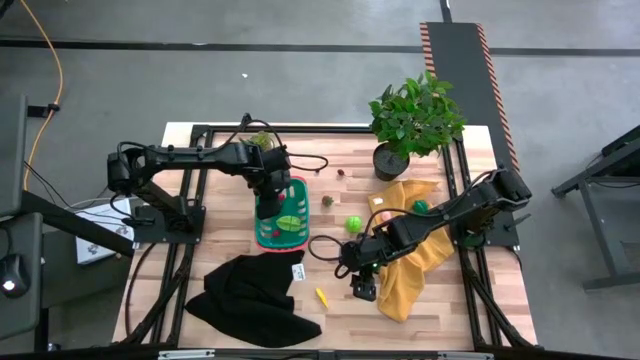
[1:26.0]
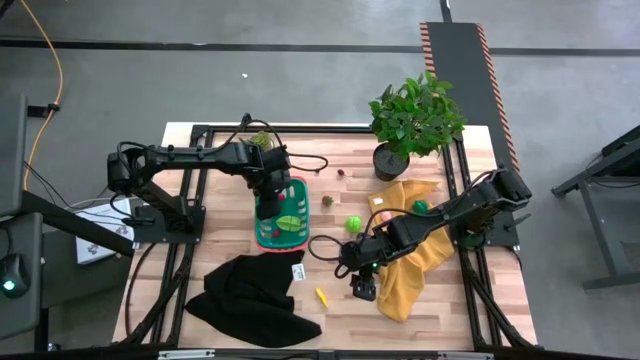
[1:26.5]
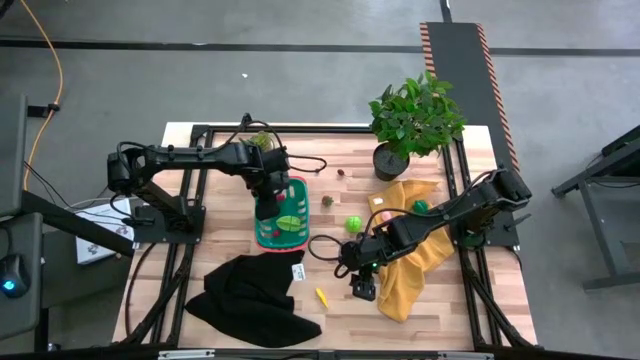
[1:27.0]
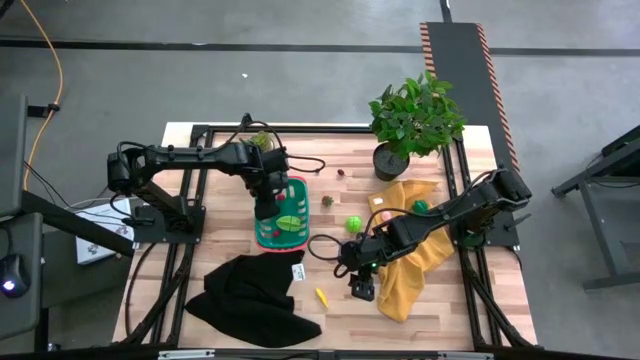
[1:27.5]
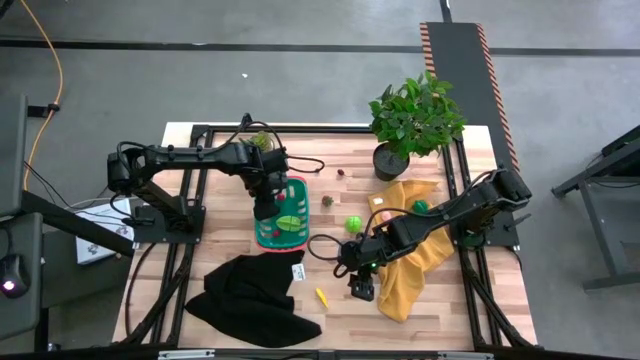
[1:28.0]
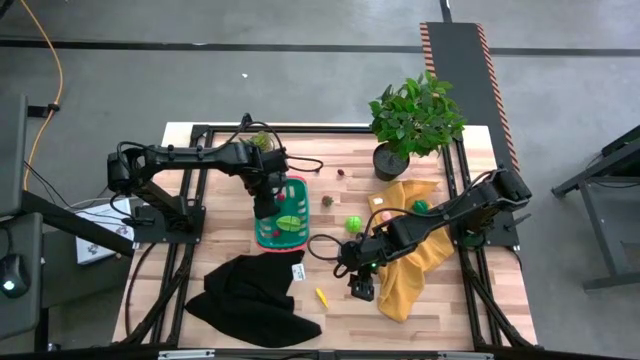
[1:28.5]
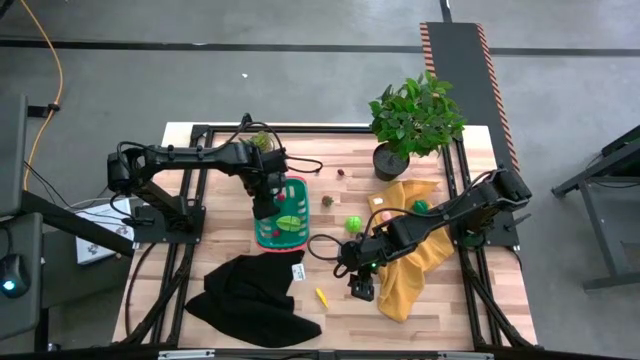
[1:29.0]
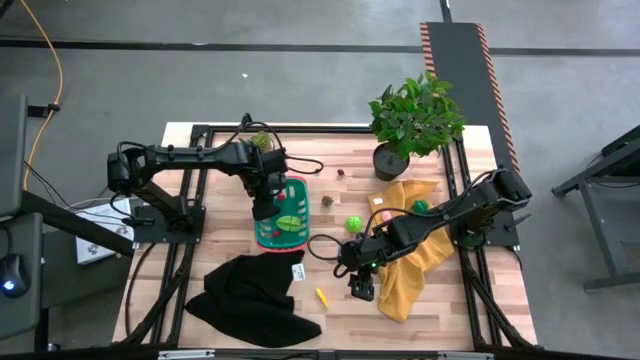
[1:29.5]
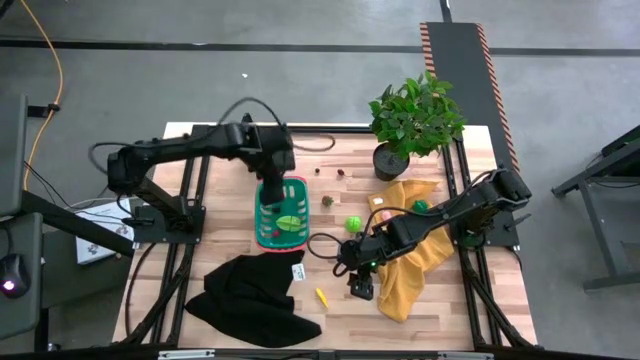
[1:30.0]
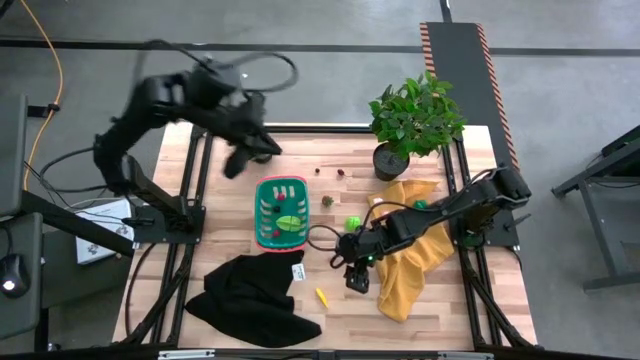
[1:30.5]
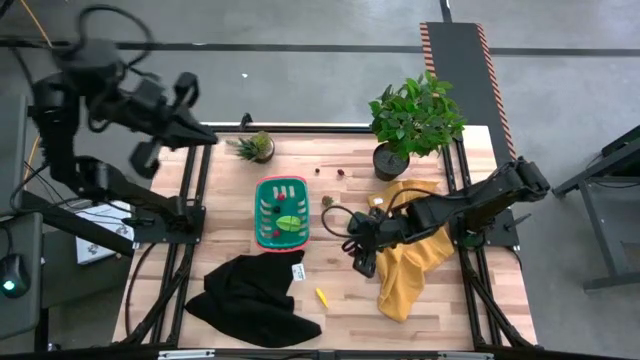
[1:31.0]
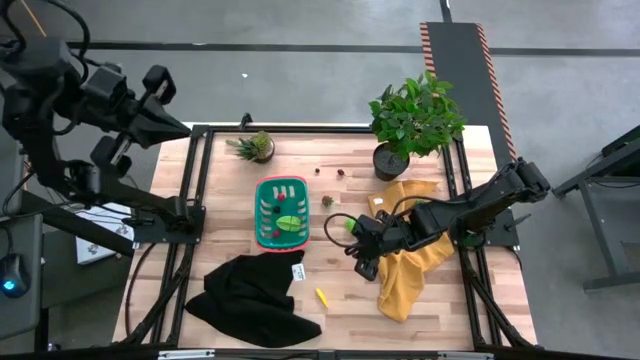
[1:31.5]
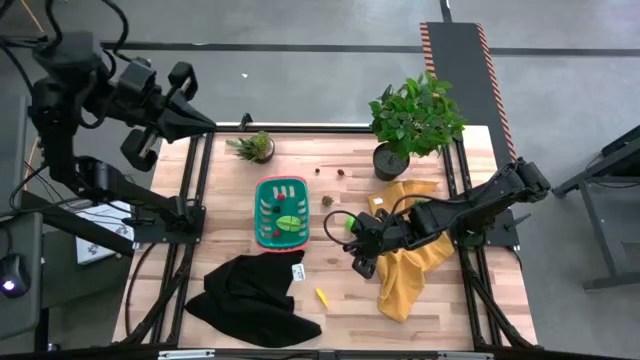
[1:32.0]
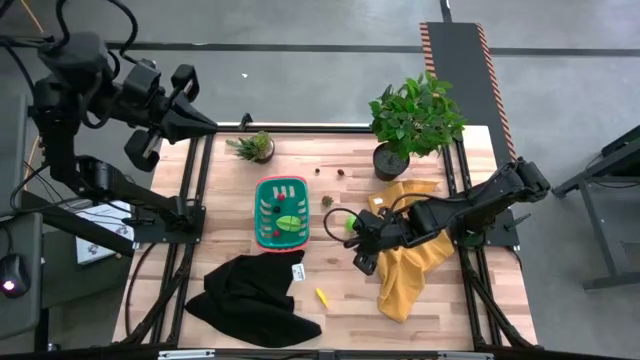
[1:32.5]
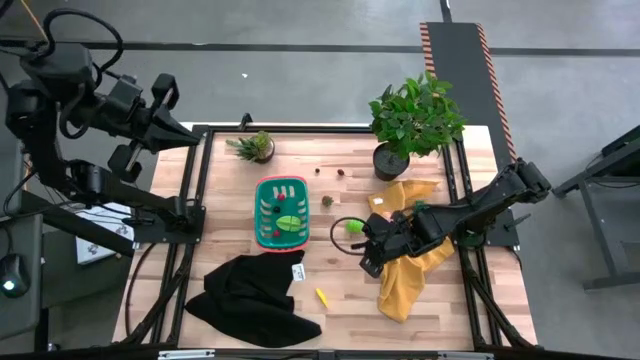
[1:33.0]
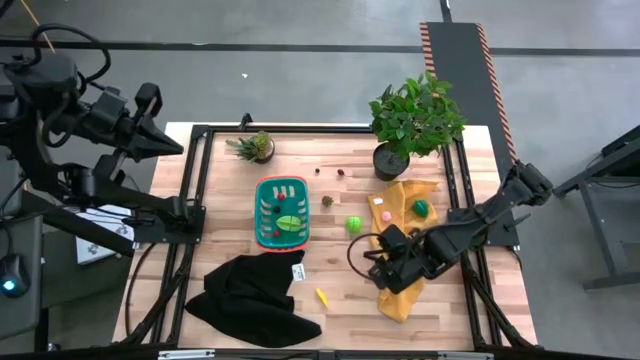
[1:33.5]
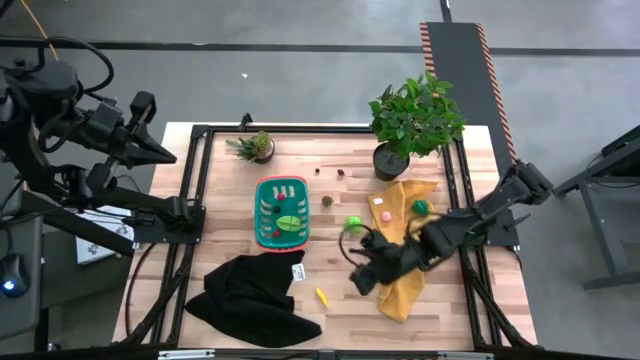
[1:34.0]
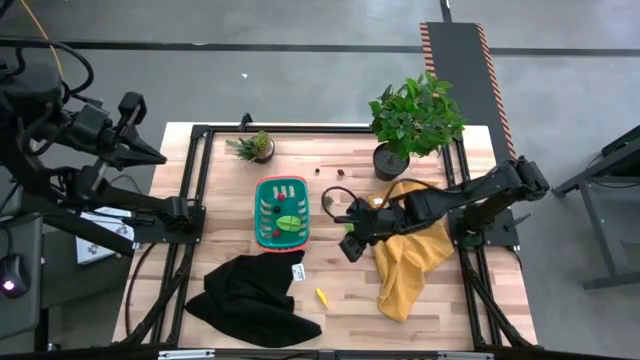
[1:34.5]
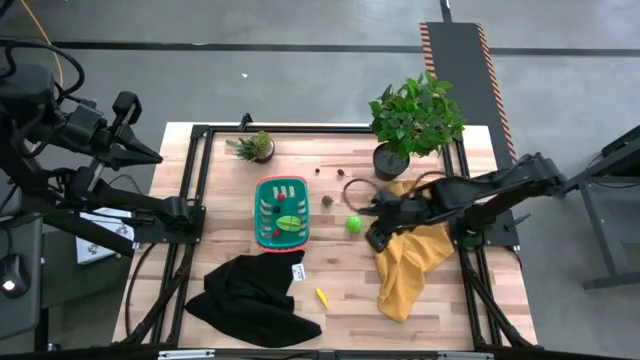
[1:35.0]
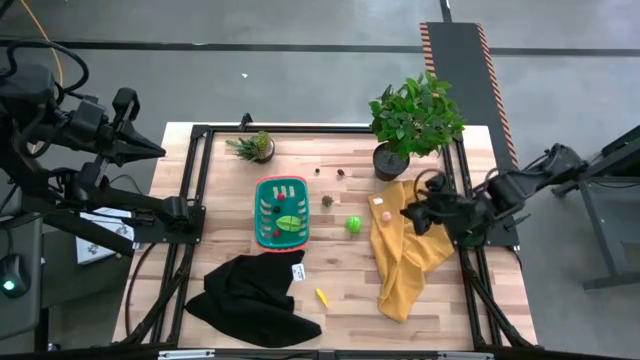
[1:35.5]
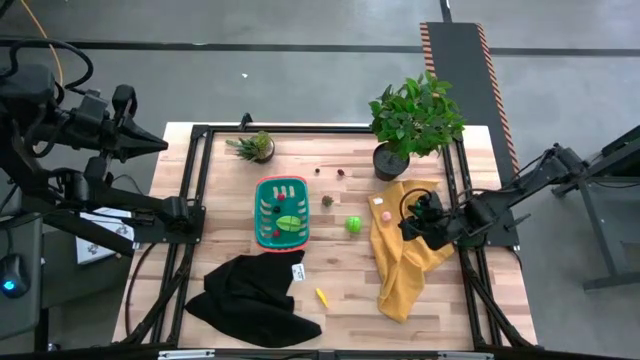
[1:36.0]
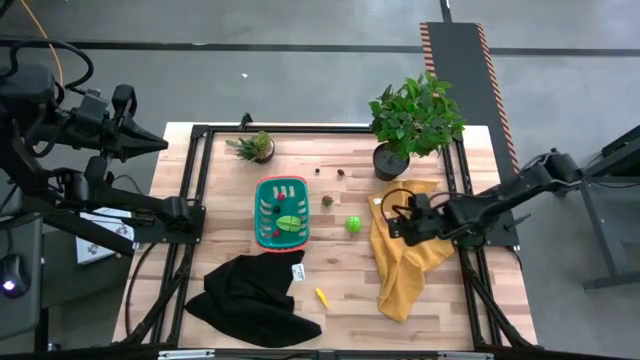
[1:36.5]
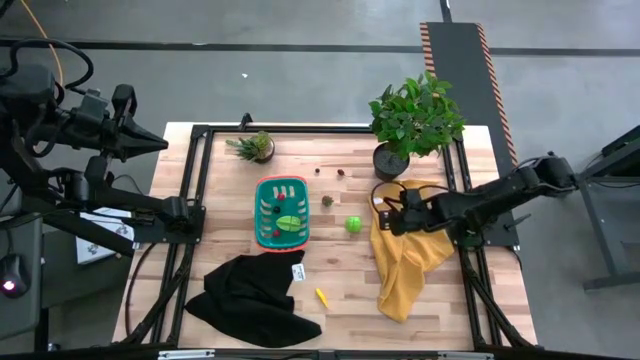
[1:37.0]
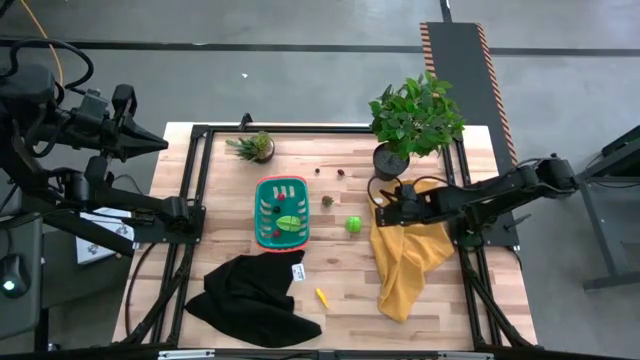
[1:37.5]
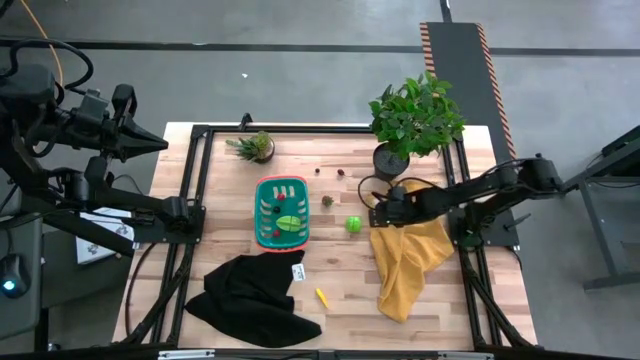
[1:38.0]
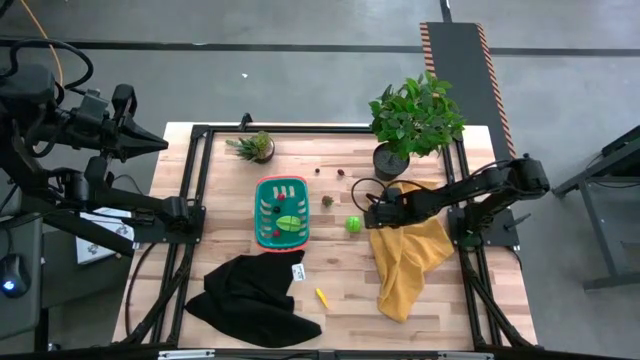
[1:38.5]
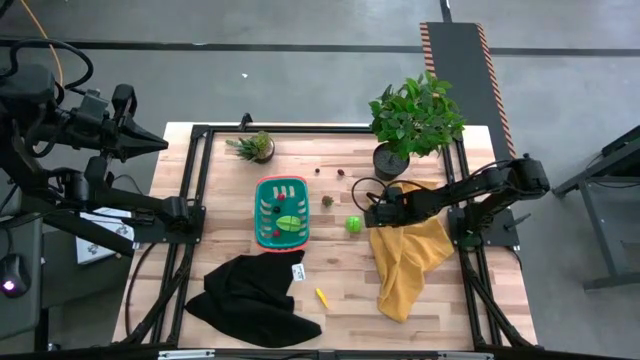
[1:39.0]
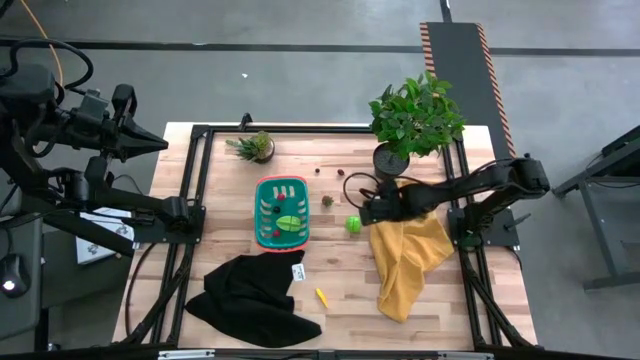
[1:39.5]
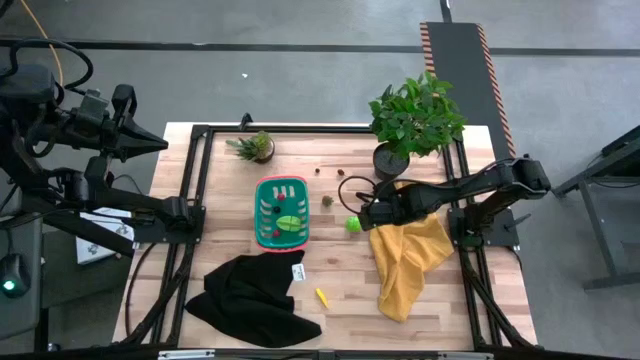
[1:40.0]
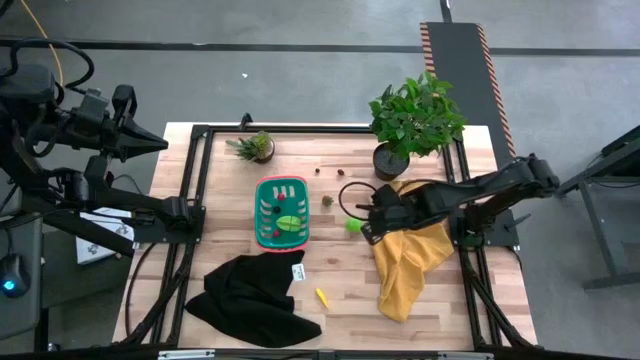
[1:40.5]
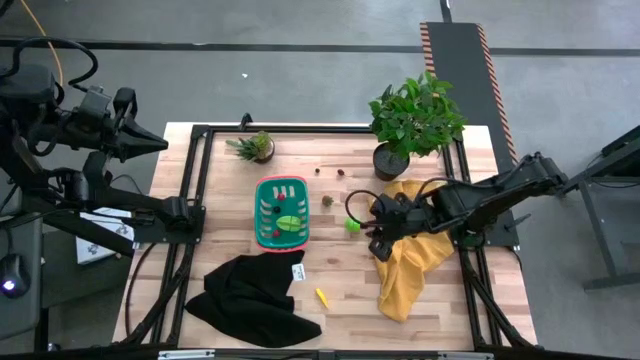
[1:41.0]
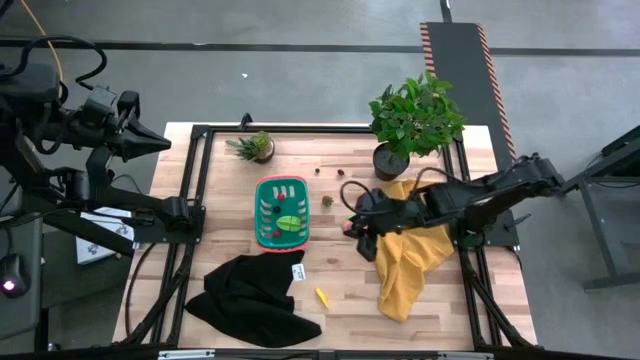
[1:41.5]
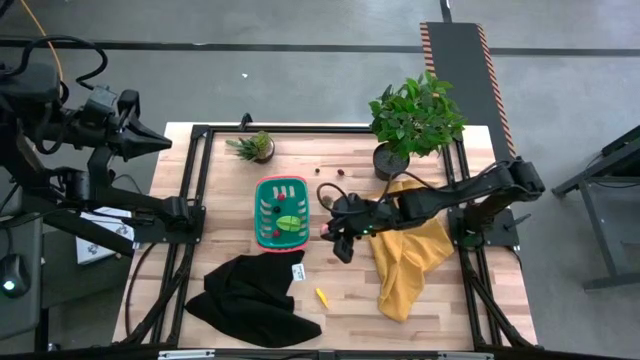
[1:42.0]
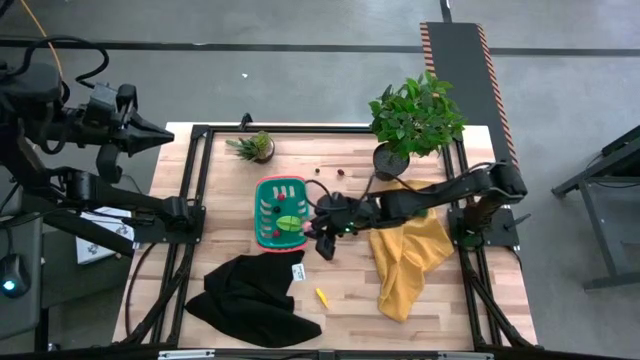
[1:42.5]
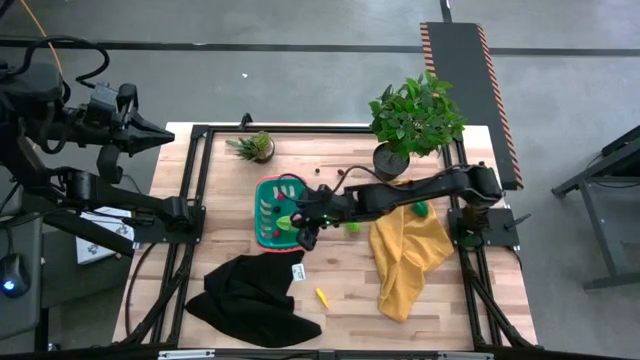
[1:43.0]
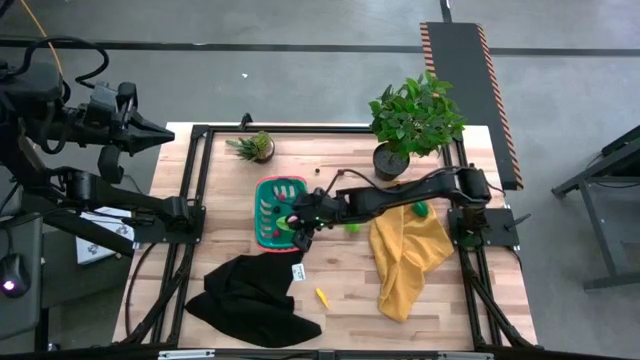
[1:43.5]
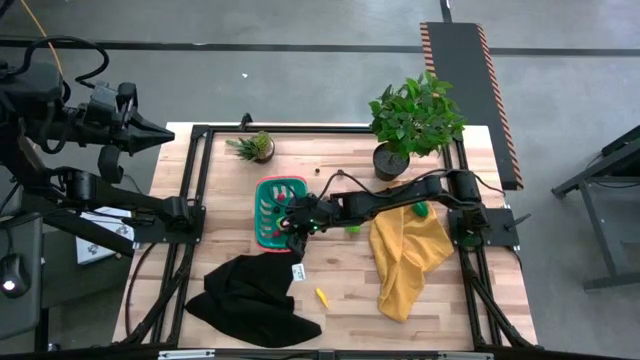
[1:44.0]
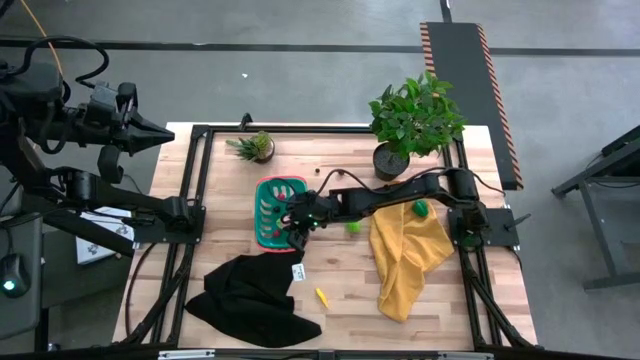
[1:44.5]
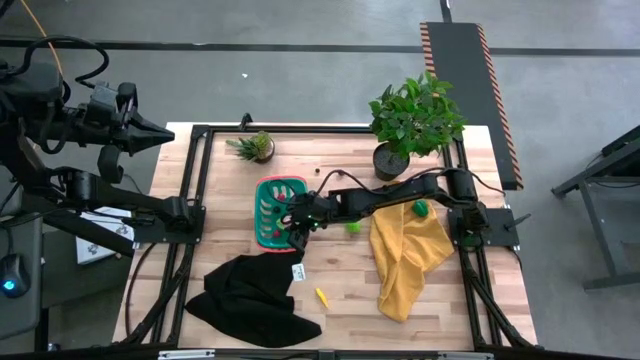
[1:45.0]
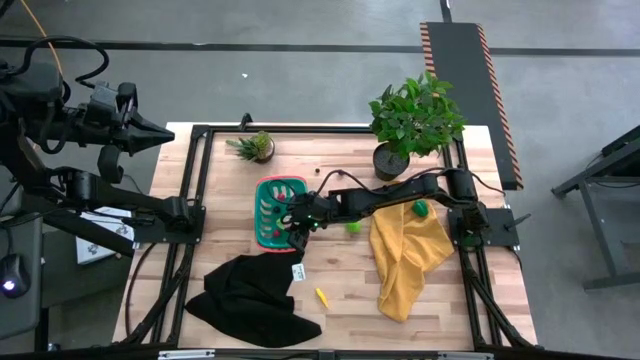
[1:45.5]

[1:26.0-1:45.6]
Task: Pick and placing Produce into tupperware
Put the pink peach in the green basket

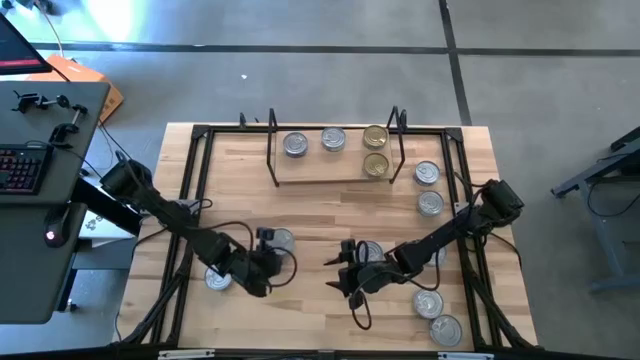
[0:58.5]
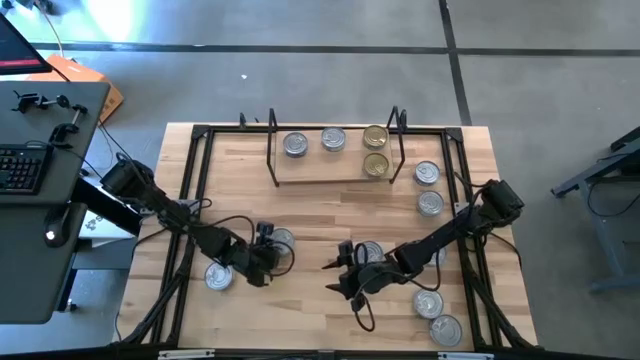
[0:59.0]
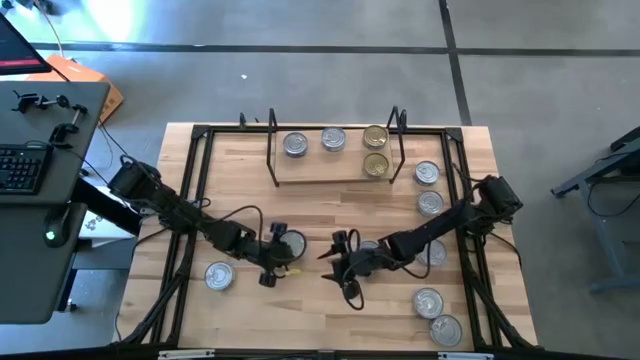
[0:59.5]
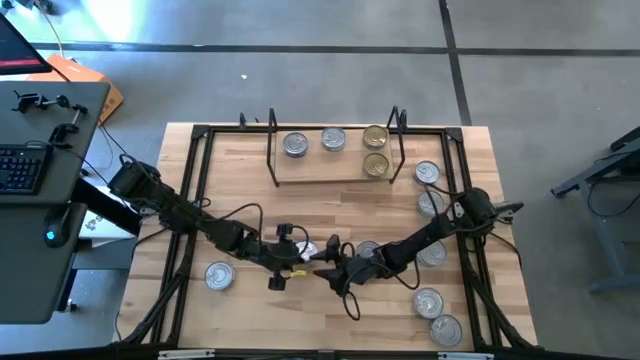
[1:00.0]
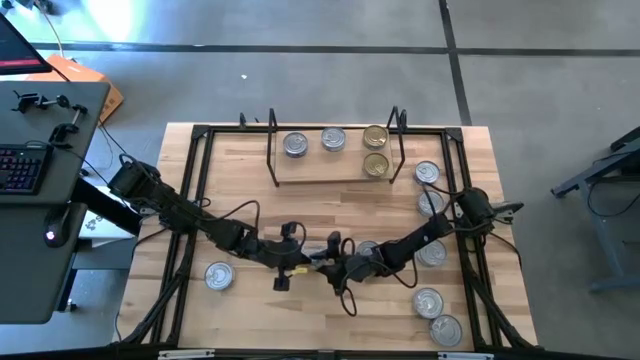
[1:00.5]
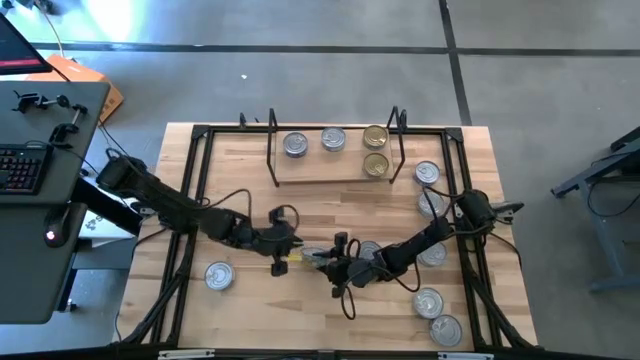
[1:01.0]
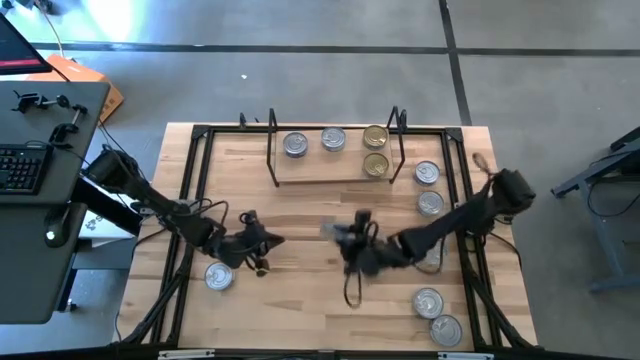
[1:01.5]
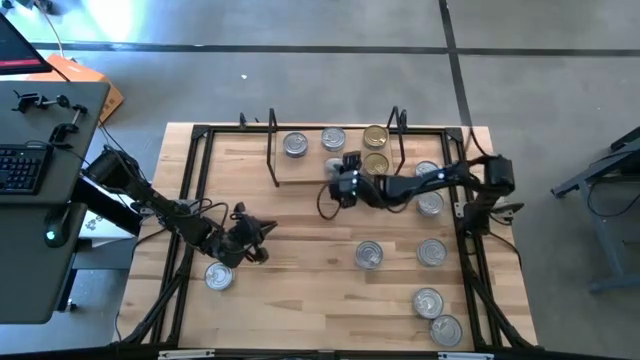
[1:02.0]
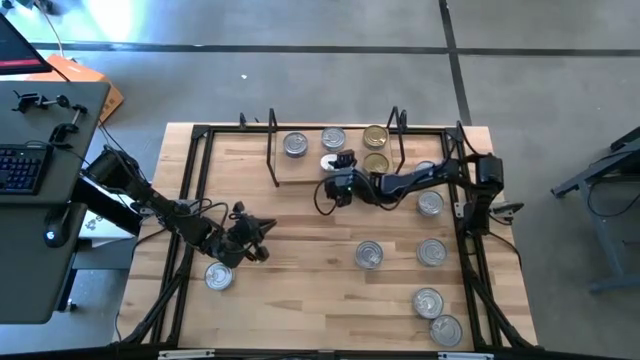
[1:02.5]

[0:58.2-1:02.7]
Task: Stack canned seafood by type on shelf
Put the light blue tuna can on the shelf and align it with the other light blue tuna can
